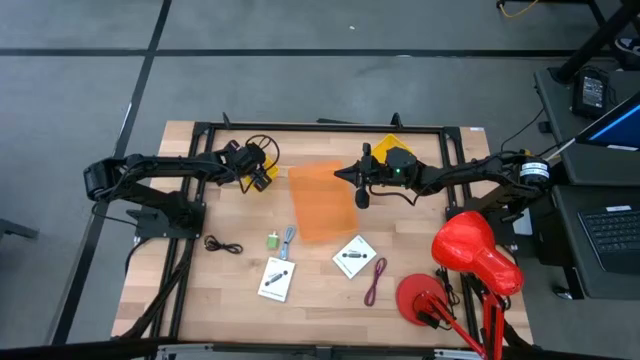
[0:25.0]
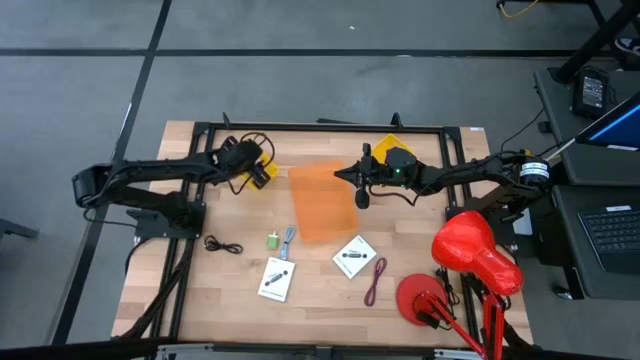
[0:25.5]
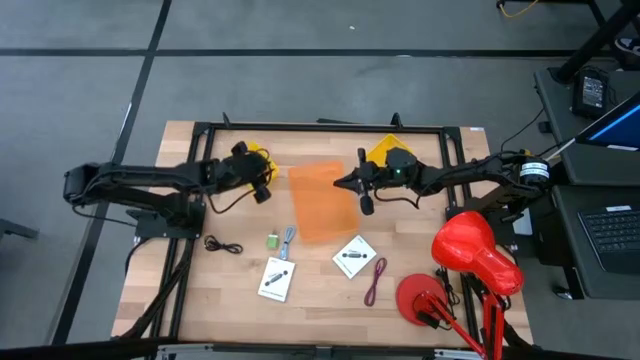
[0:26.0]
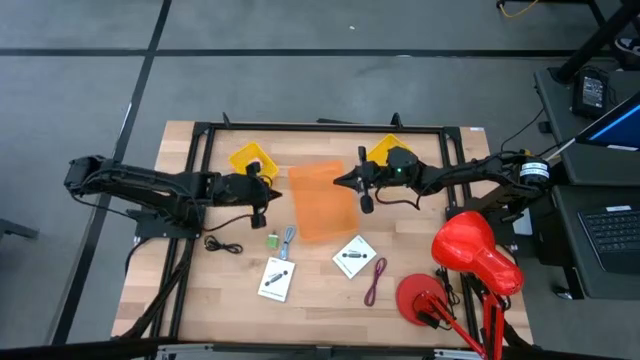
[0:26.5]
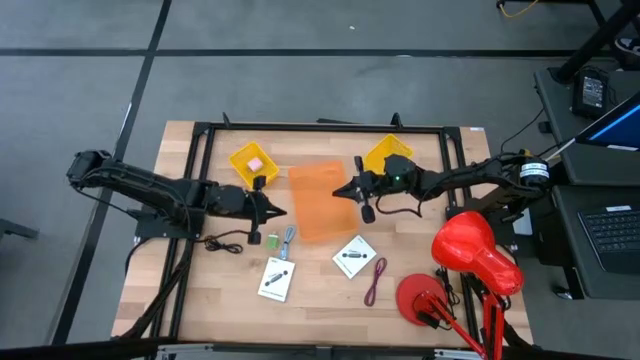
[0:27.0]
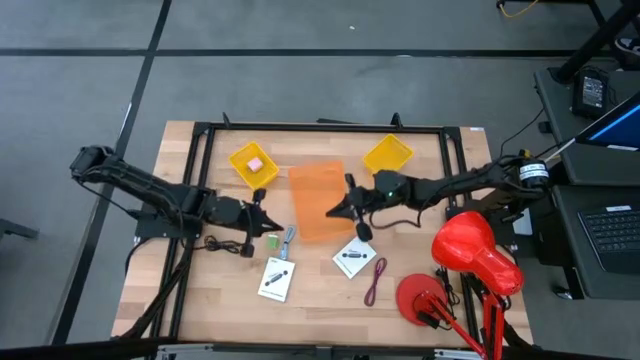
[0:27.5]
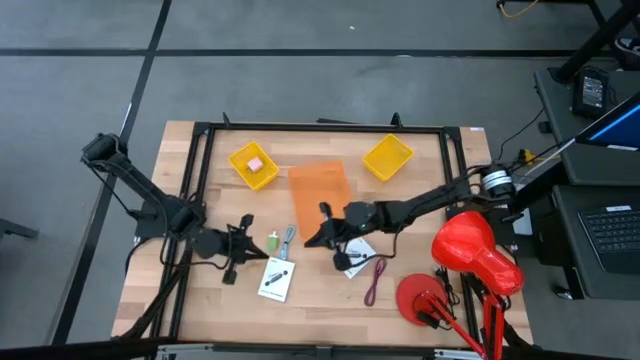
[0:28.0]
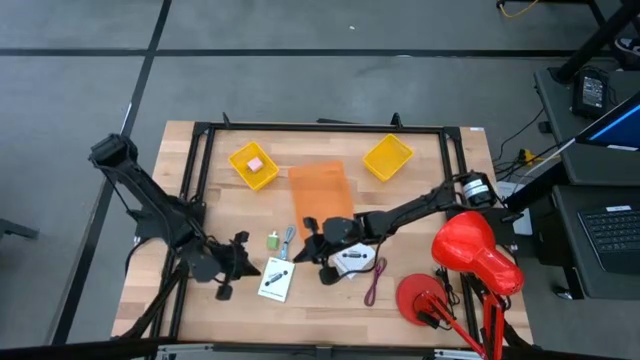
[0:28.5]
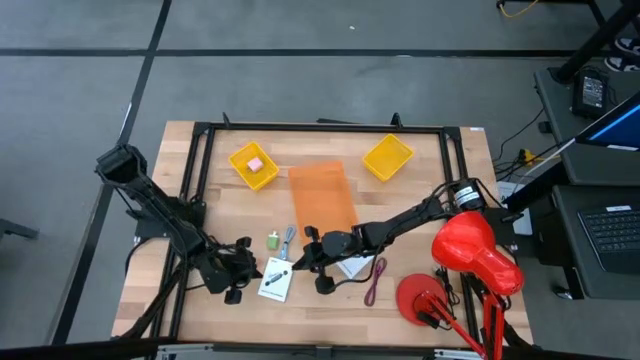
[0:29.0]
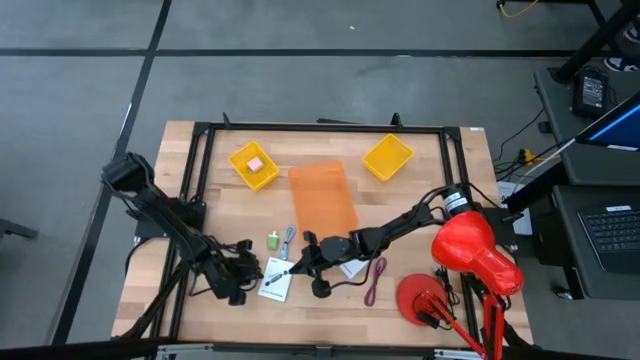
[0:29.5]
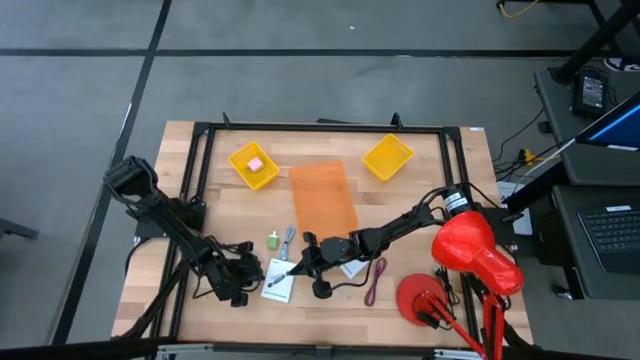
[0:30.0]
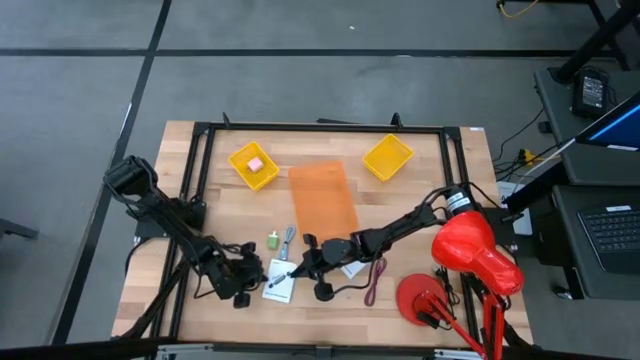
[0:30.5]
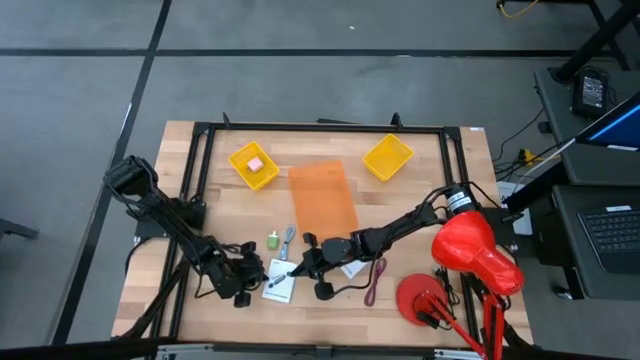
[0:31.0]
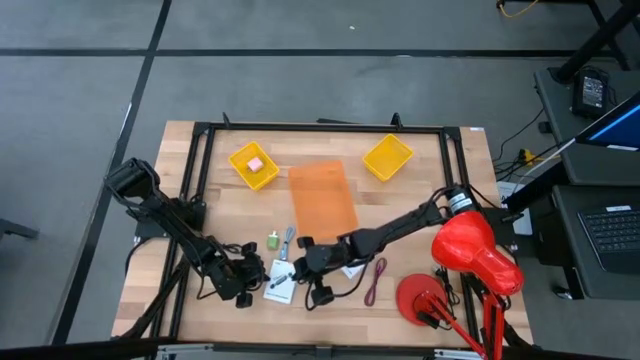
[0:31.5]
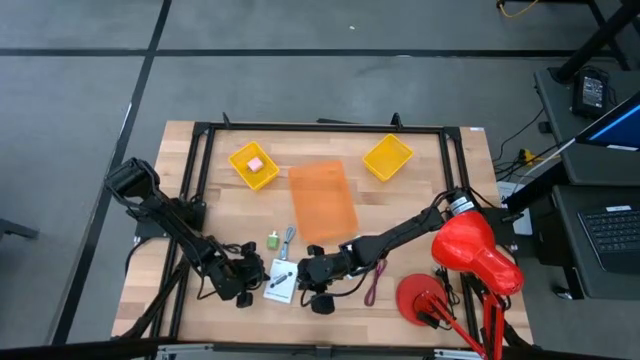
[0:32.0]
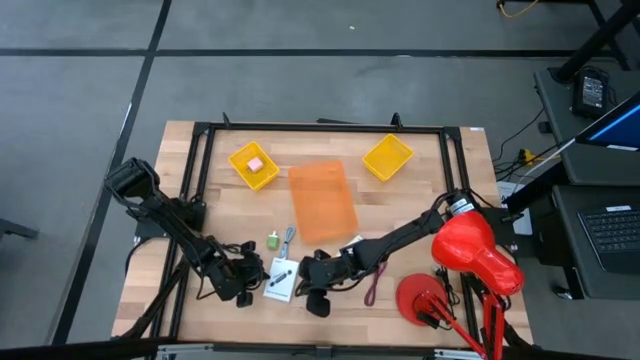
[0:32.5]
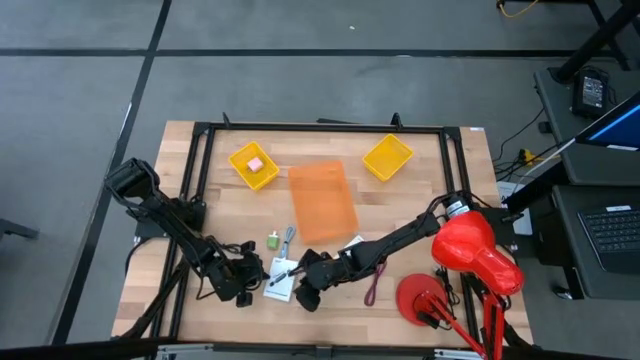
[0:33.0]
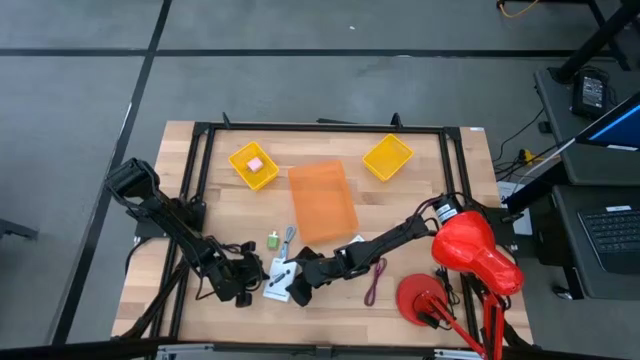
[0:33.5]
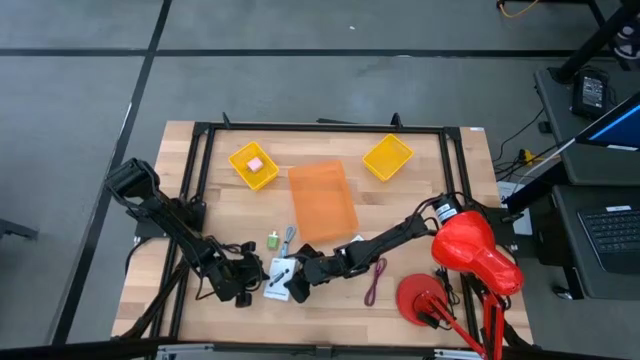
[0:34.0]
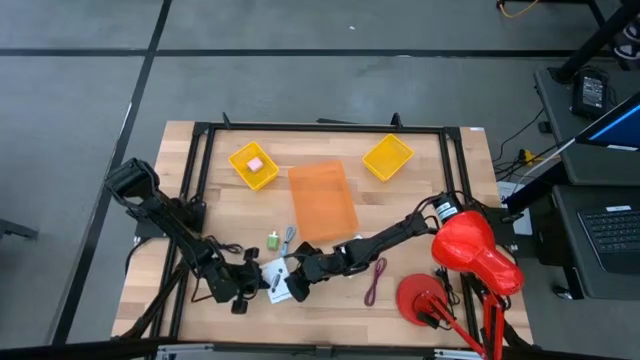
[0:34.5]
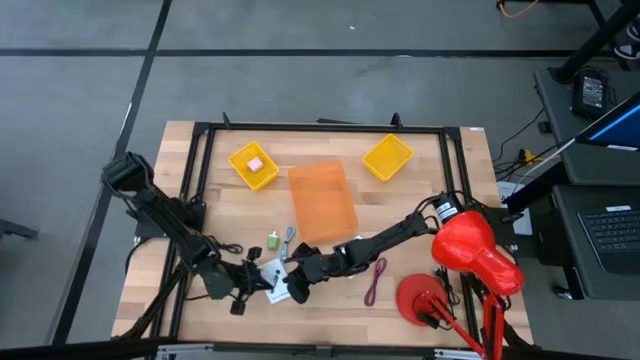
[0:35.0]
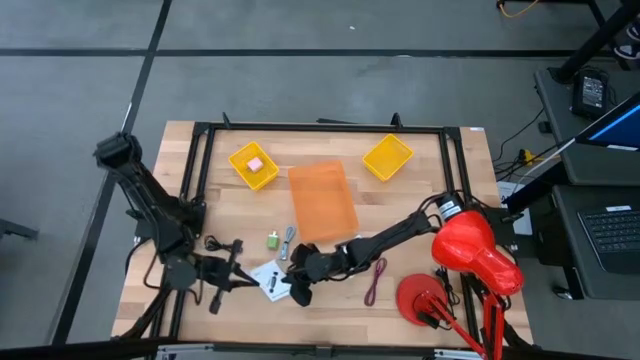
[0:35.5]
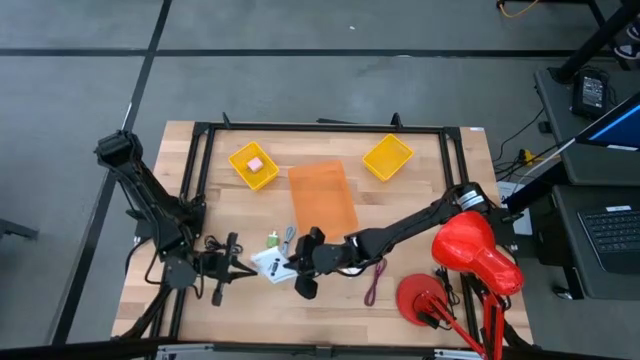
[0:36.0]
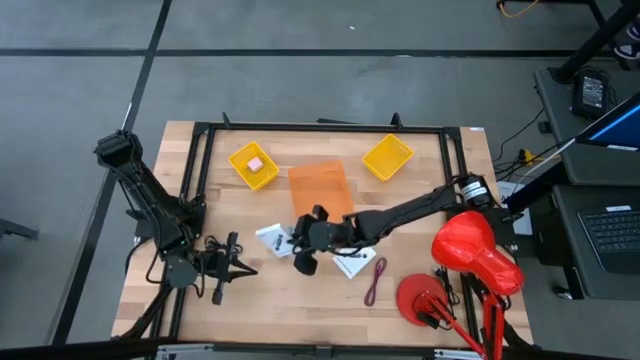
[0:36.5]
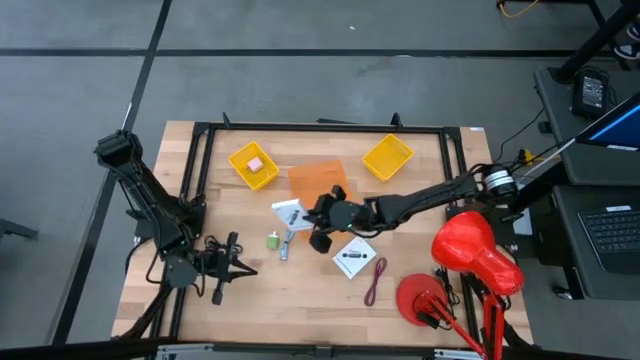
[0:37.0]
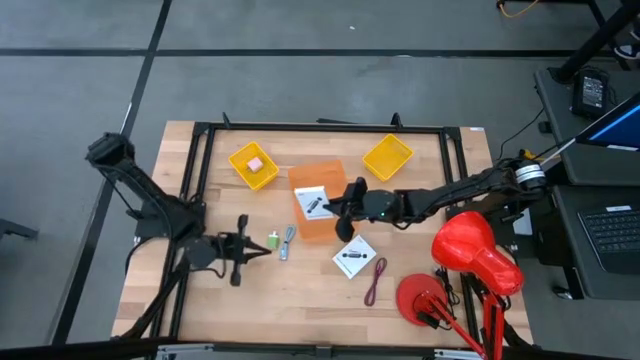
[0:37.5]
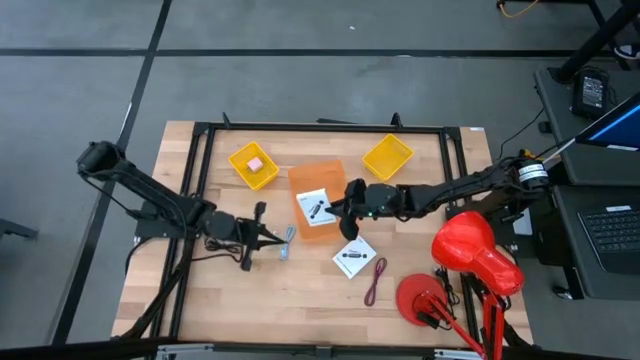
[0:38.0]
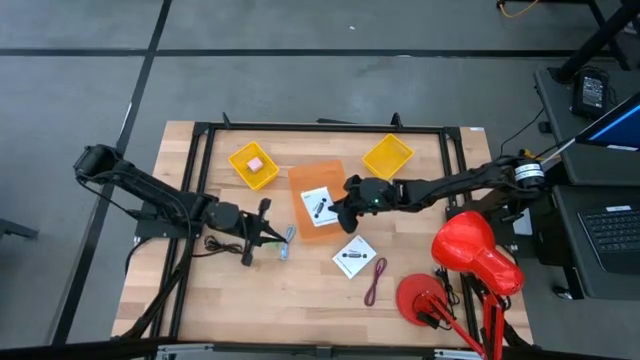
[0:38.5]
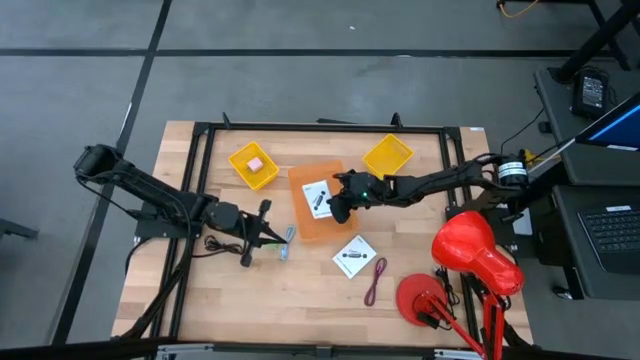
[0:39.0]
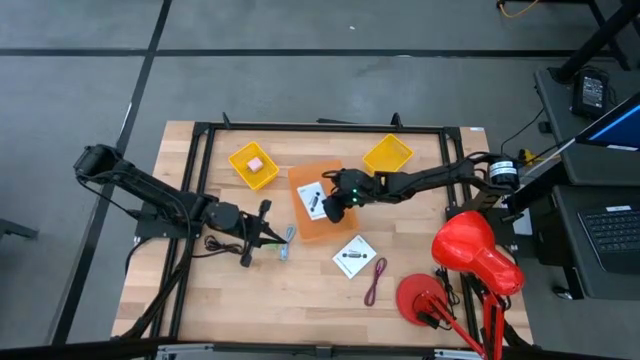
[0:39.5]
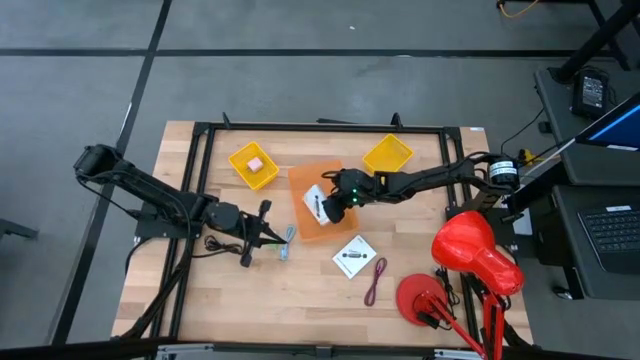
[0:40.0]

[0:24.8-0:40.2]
Task: Pick and place items into bin
Put the bottom card reader box into the orange bin

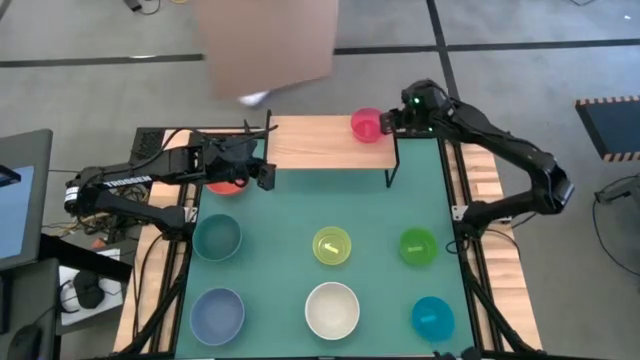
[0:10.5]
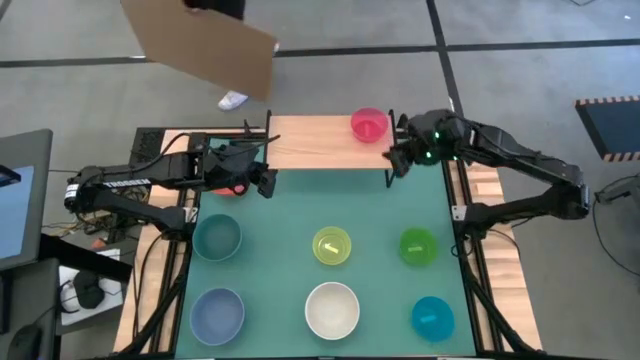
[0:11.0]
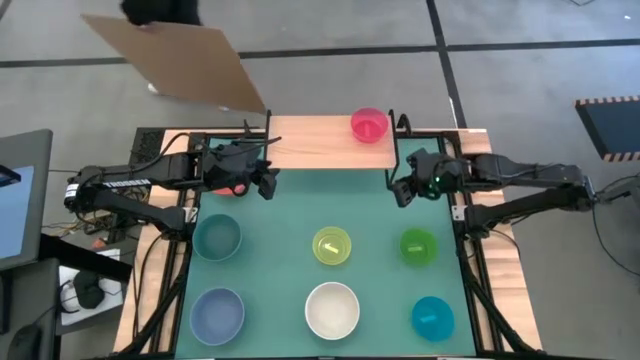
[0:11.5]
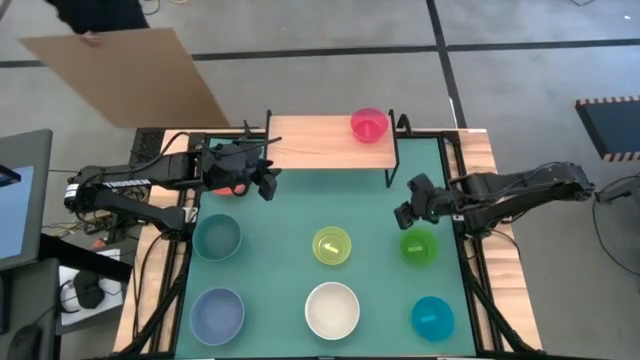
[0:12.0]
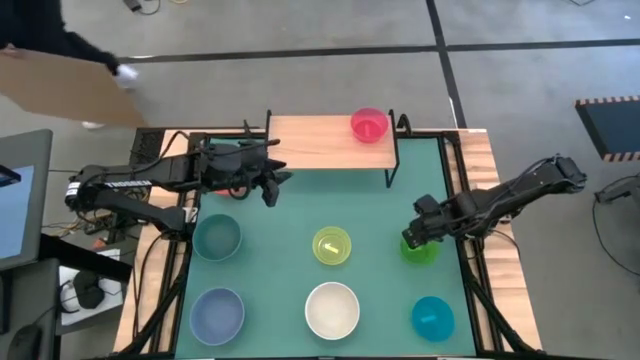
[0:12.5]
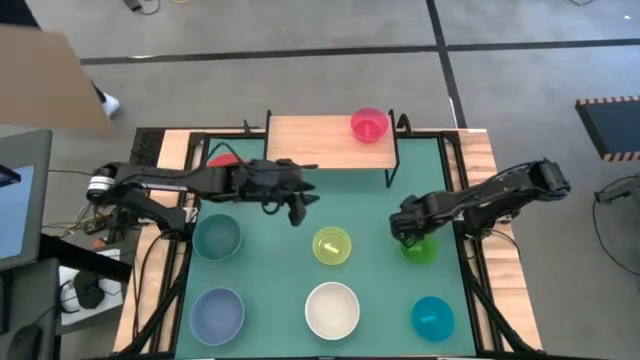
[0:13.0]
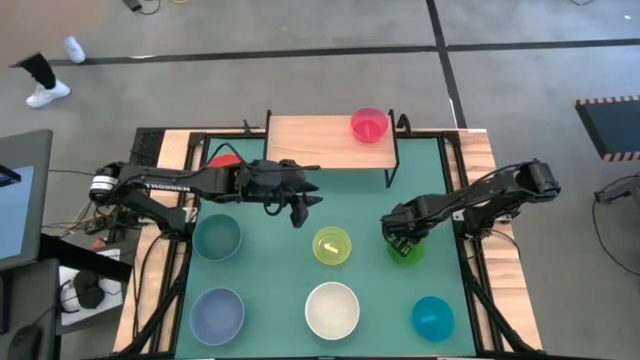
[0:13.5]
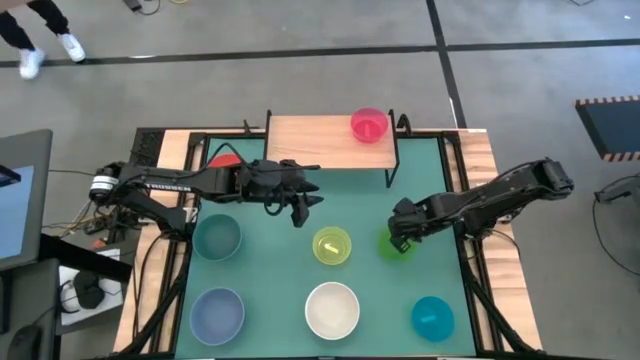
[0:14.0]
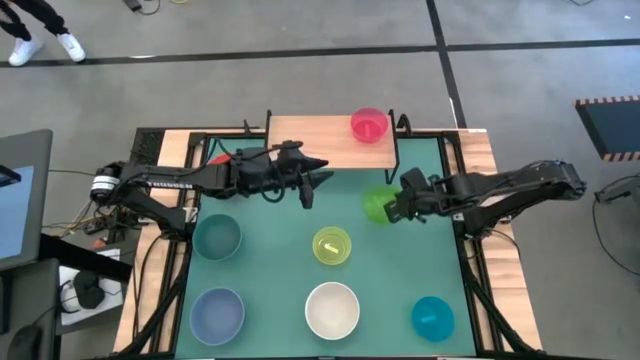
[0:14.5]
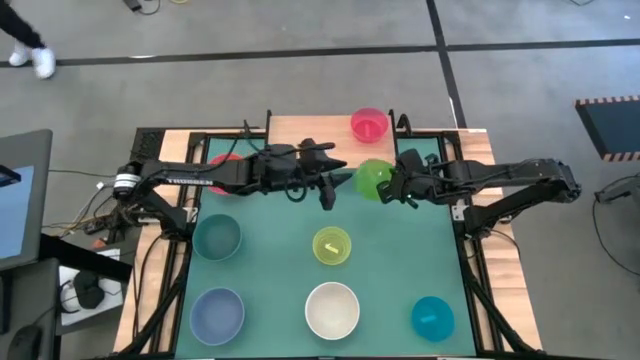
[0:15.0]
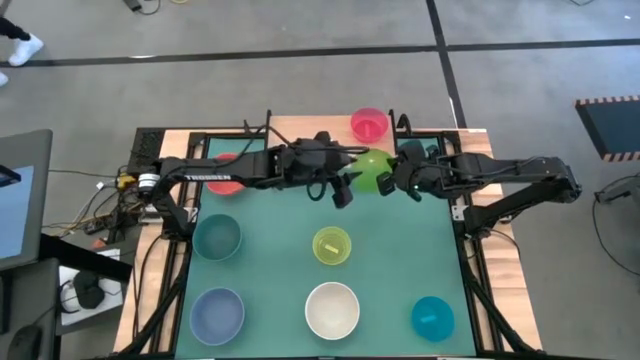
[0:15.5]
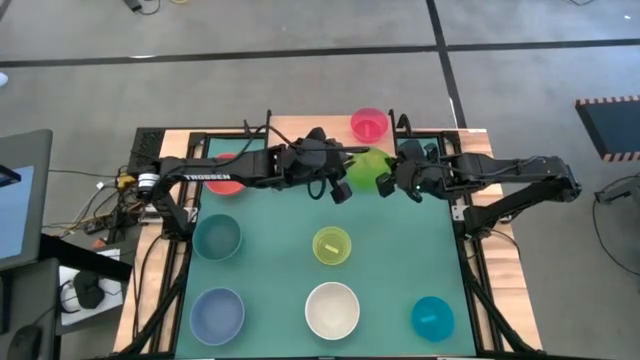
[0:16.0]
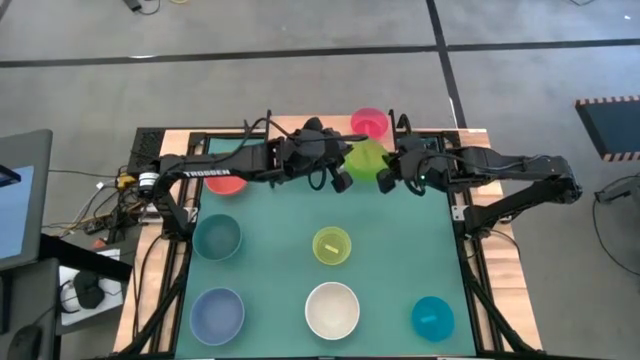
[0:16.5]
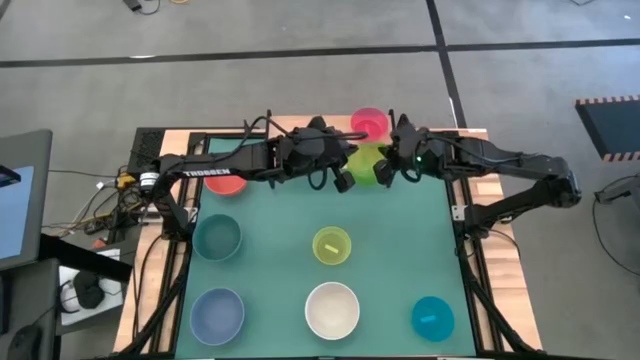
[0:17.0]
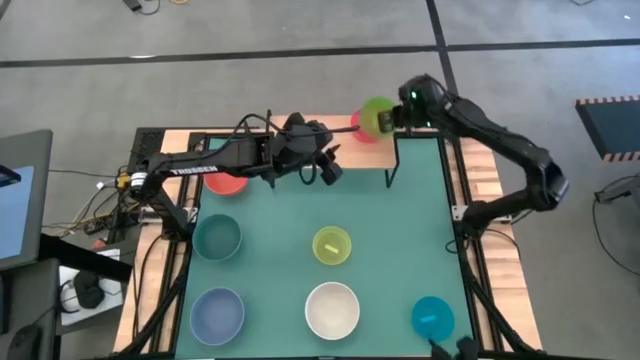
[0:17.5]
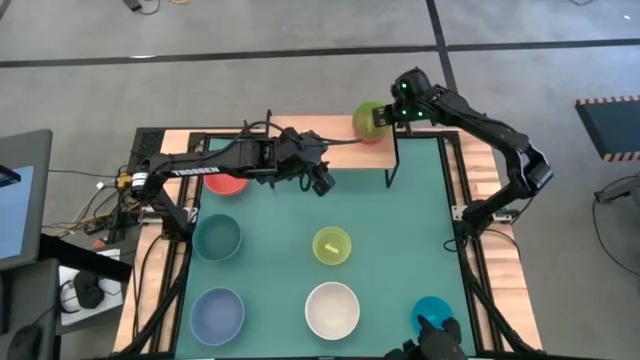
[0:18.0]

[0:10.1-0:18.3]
Task: Place and stack bowls onto a shelf
Stack the small green bowl on top of the small pink bowl on the shelf
